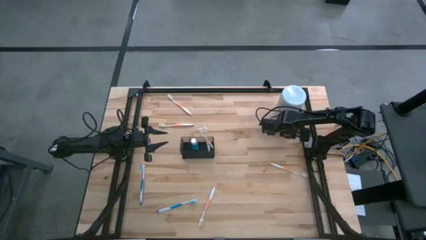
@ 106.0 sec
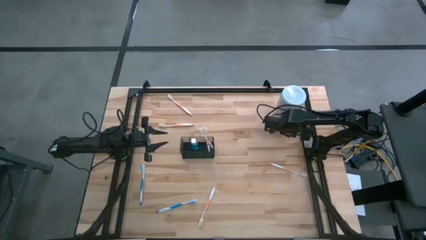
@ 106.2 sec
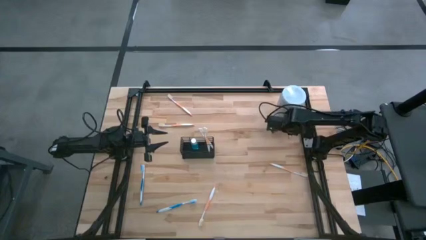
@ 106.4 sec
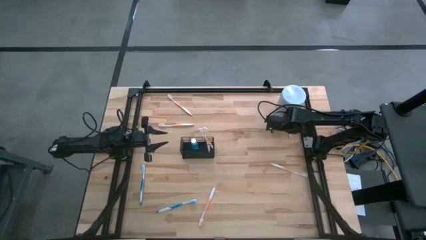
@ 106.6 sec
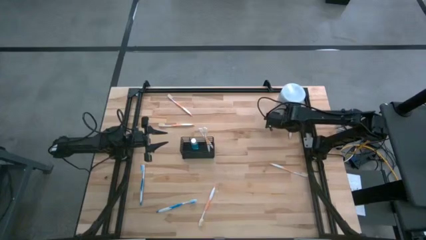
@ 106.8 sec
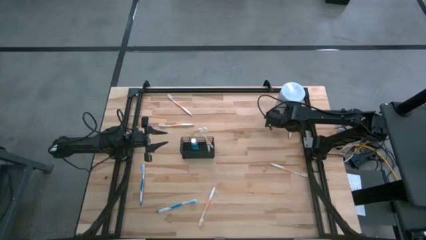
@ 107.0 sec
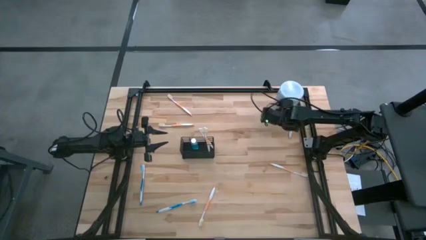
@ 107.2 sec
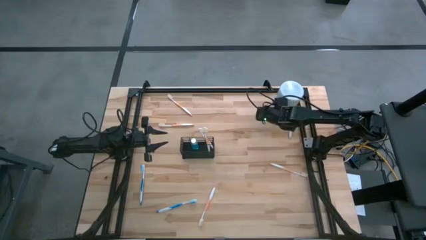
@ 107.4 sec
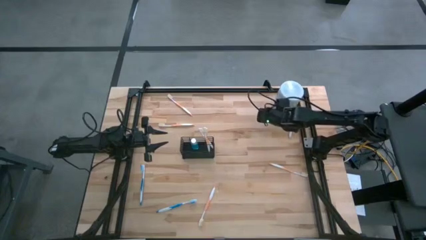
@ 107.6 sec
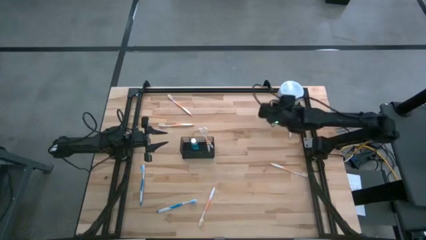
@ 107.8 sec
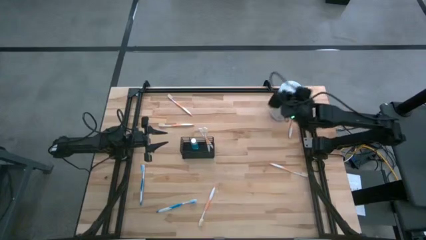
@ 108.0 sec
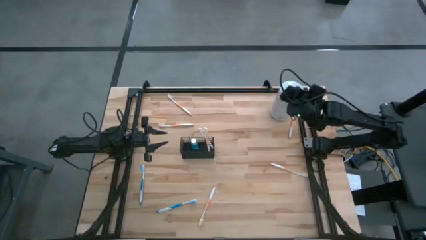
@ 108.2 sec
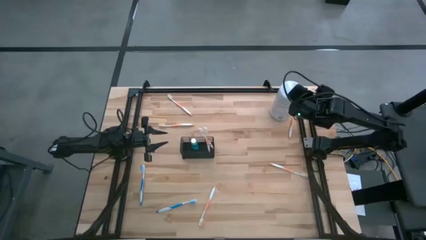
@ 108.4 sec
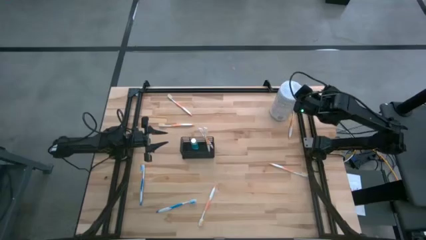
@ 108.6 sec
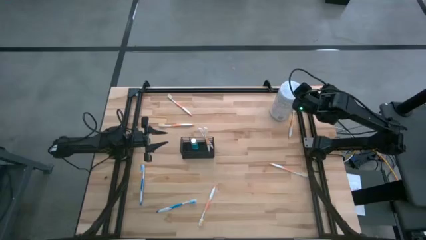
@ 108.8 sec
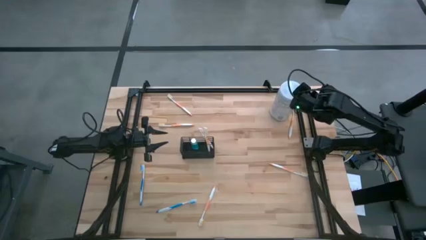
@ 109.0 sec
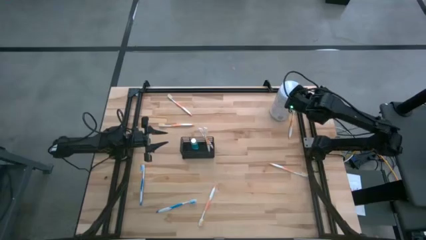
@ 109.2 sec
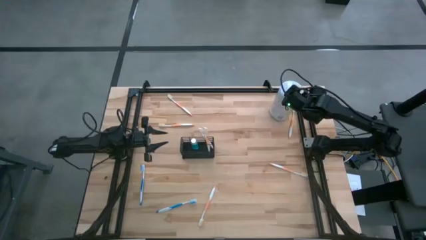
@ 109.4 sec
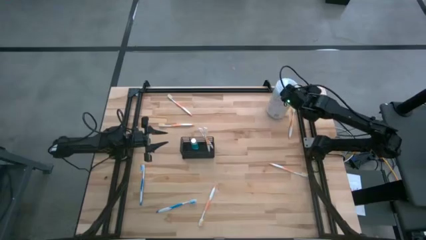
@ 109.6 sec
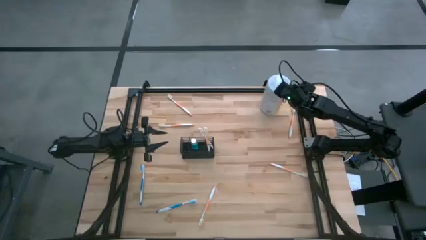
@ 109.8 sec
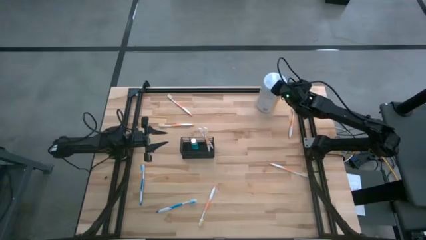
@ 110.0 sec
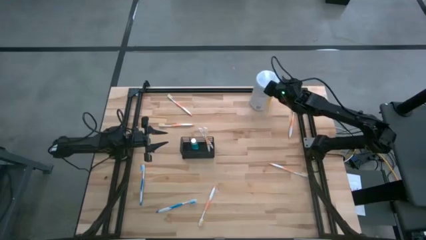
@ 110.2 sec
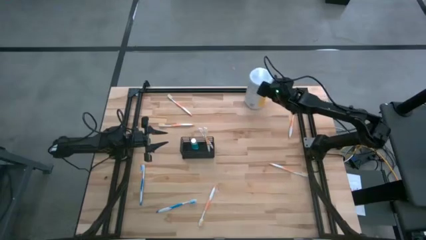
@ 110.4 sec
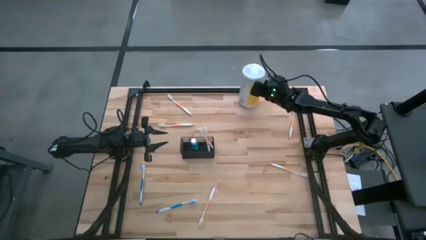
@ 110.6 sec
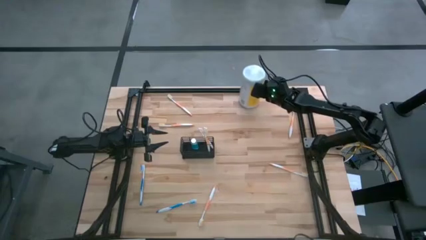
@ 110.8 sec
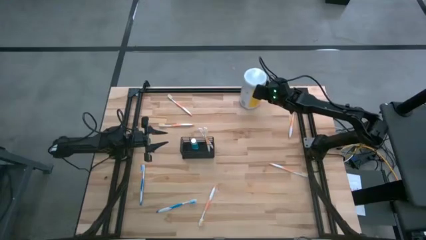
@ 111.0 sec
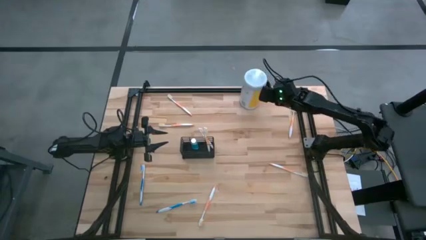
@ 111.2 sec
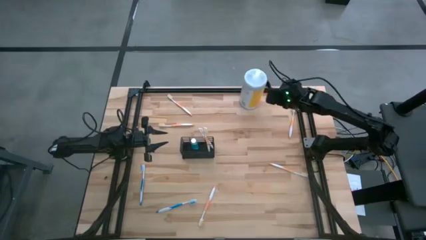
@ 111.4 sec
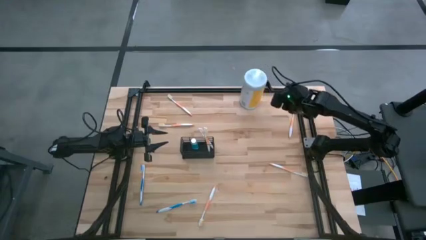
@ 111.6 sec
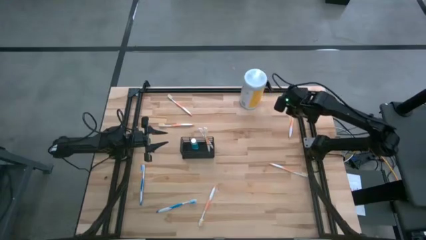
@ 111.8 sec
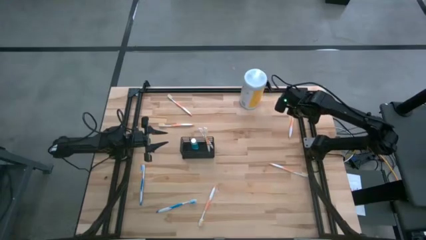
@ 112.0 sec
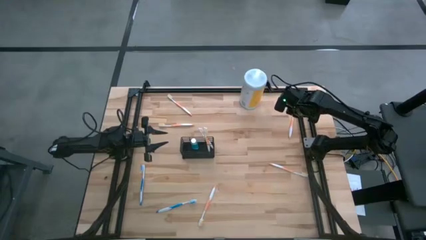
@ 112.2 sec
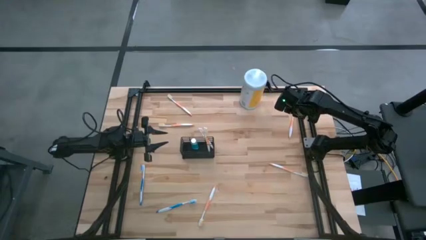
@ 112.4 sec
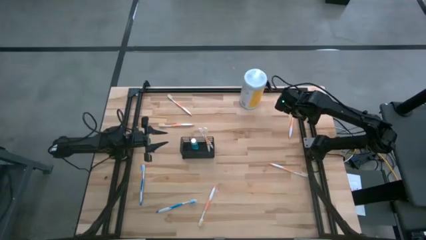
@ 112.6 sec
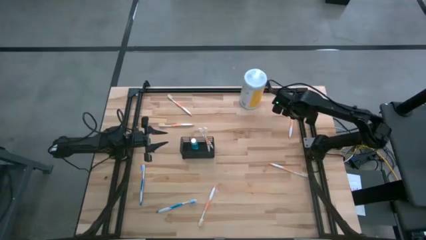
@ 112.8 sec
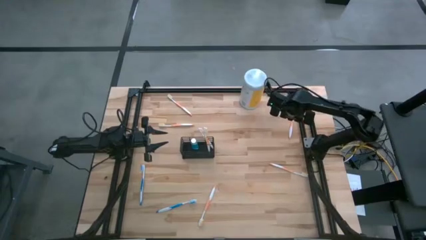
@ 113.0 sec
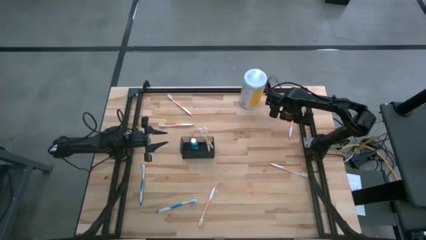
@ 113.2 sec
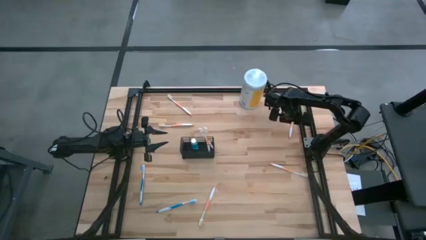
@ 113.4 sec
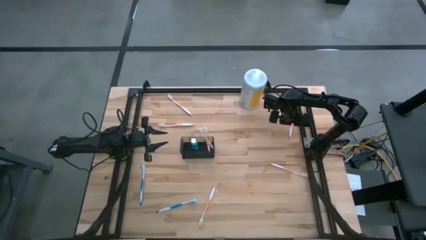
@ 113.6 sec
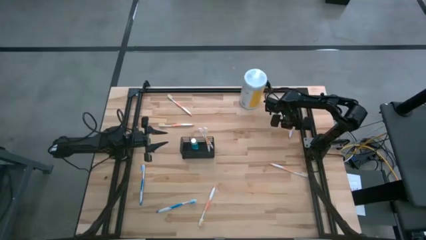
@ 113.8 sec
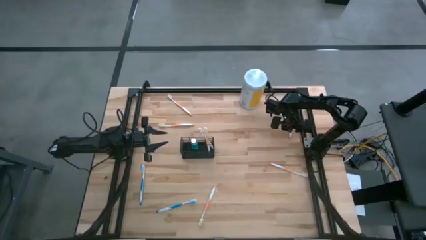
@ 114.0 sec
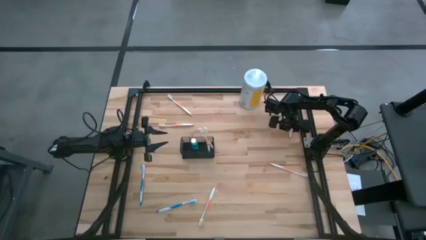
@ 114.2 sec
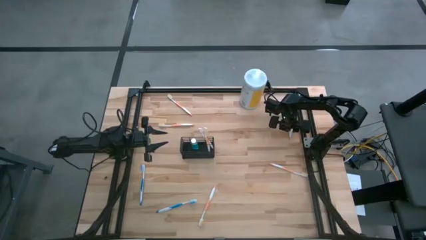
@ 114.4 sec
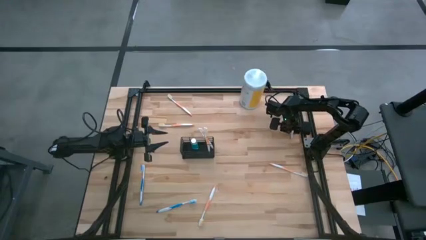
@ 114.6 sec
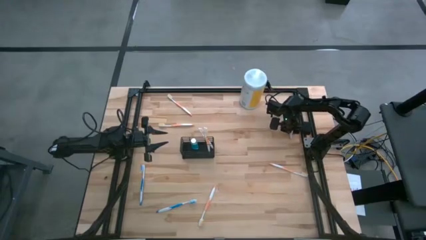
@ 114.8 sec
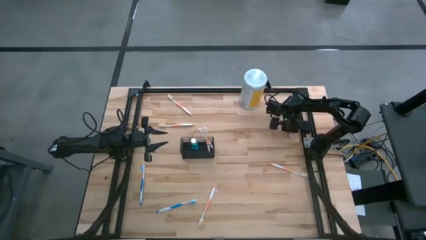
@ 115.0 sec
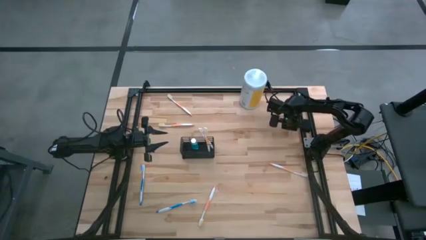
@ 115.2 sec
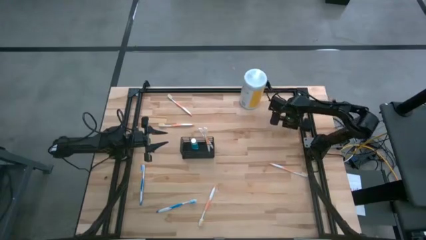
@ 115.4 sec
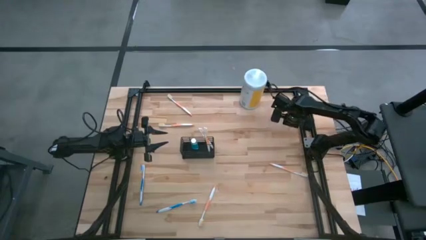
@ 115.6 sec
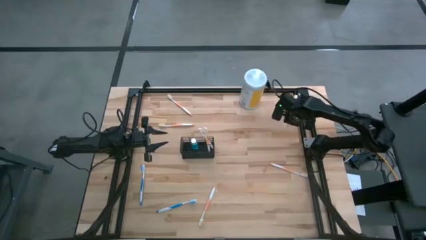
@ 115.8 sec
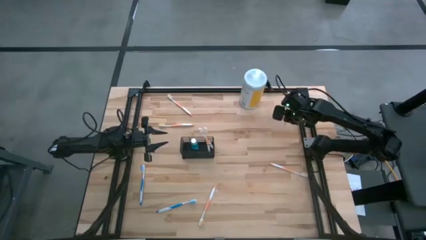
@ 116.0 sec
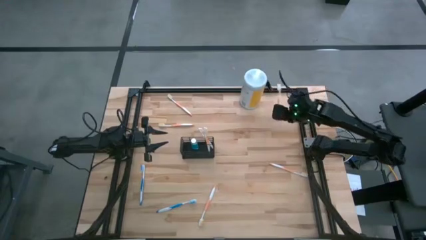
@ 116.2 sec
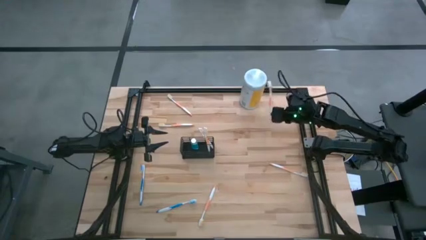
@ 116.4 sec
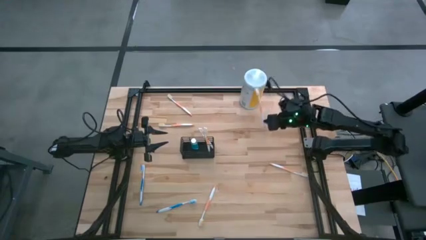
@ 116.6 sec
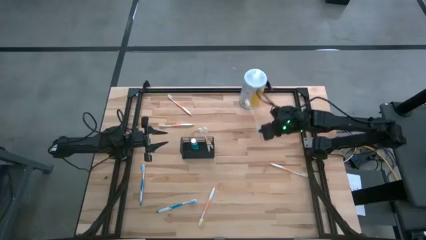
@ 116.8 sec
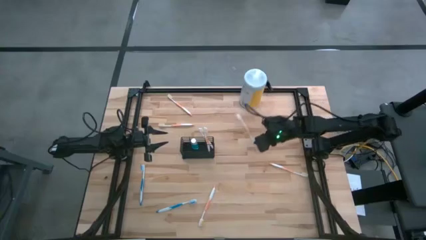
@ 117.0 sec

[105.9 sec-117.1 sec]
Task: Pick & Place toothbrushing station
Put the orange toothbrush into the right section of the wire organizer

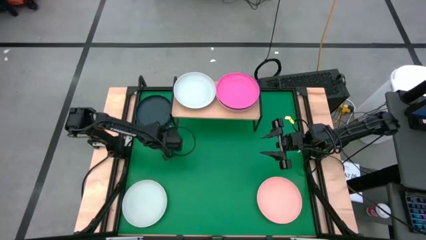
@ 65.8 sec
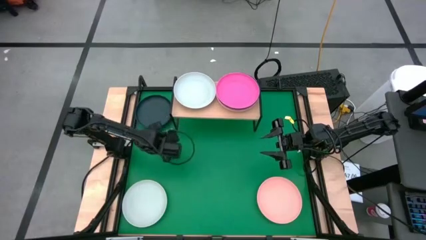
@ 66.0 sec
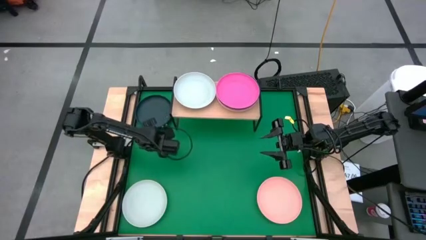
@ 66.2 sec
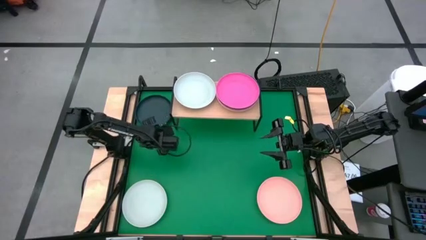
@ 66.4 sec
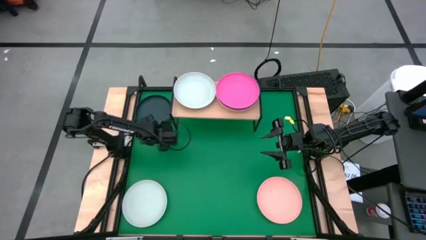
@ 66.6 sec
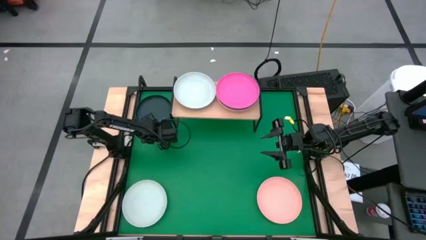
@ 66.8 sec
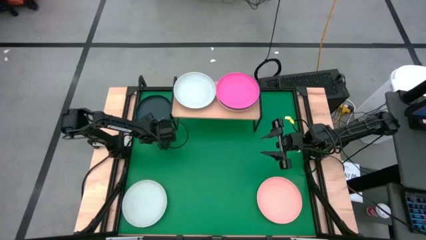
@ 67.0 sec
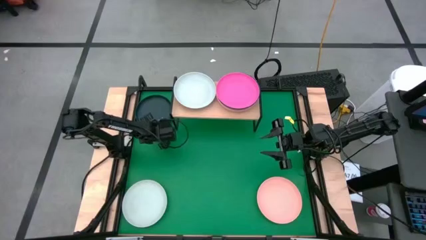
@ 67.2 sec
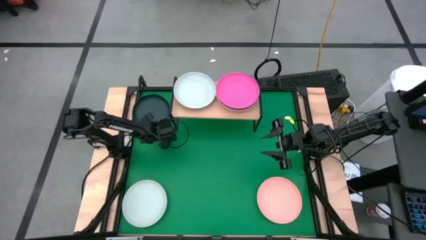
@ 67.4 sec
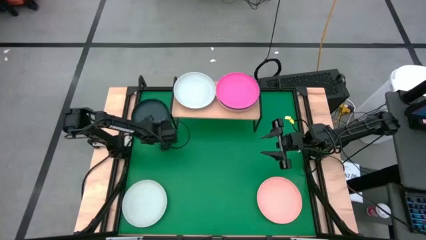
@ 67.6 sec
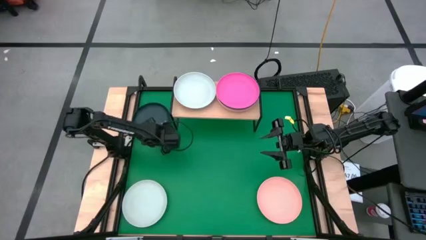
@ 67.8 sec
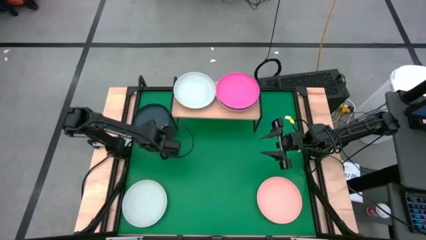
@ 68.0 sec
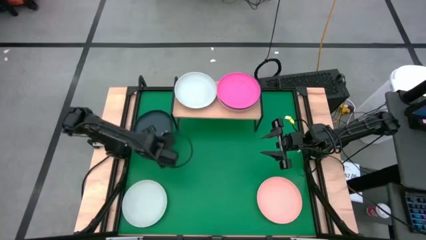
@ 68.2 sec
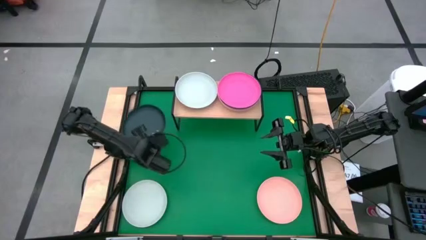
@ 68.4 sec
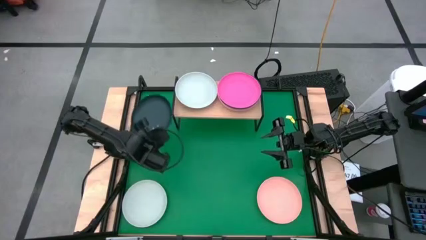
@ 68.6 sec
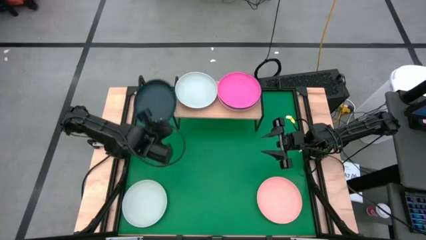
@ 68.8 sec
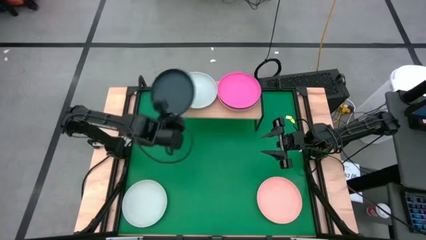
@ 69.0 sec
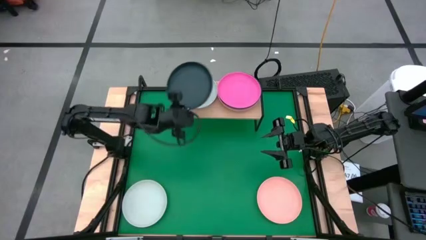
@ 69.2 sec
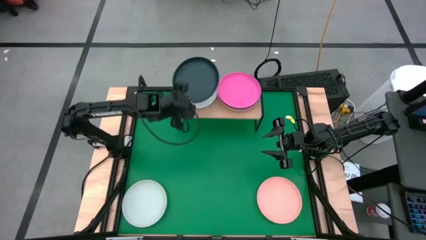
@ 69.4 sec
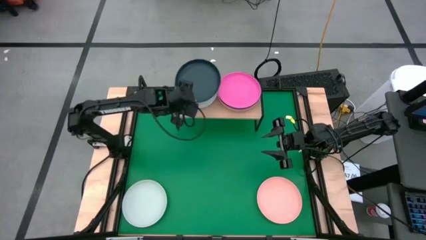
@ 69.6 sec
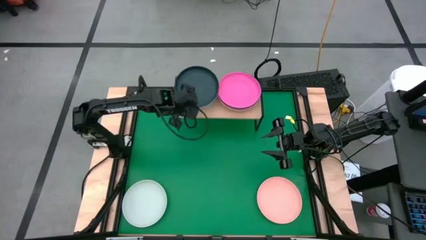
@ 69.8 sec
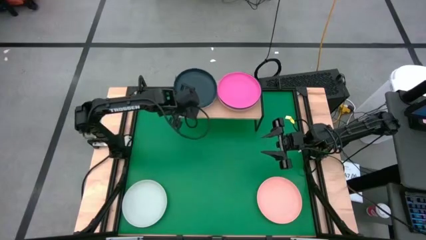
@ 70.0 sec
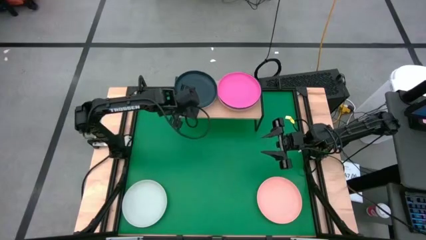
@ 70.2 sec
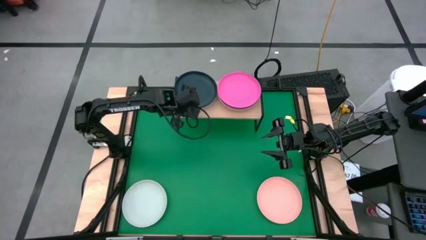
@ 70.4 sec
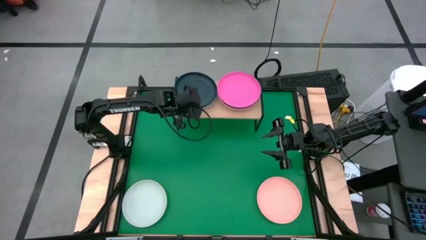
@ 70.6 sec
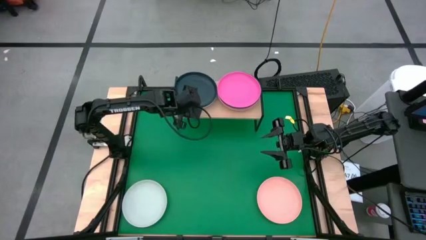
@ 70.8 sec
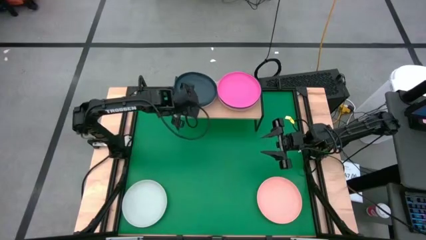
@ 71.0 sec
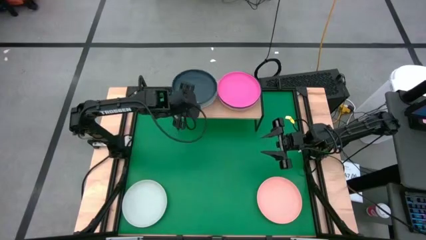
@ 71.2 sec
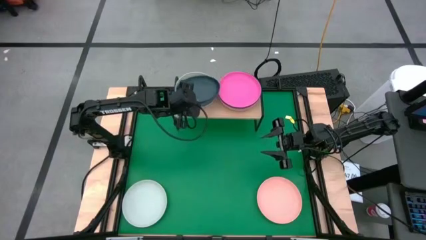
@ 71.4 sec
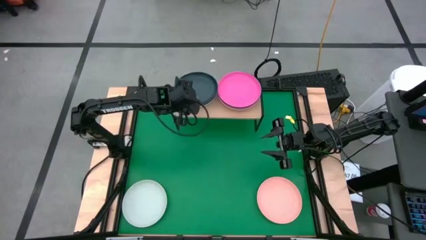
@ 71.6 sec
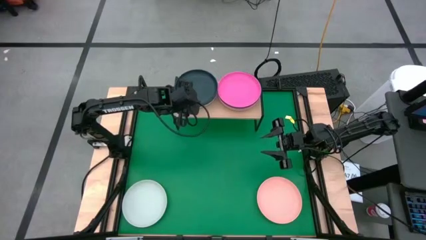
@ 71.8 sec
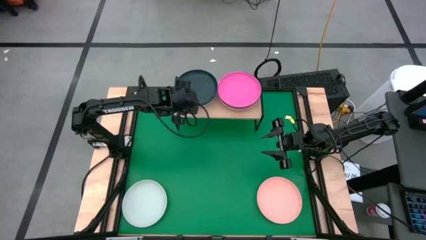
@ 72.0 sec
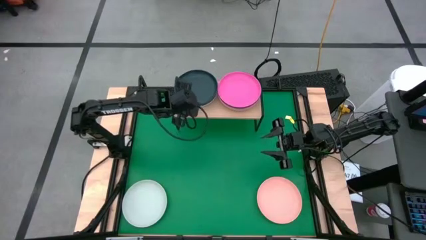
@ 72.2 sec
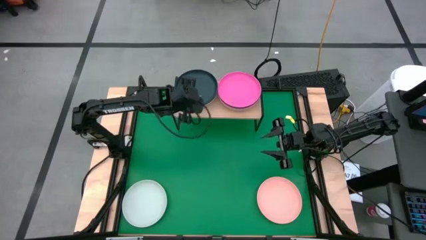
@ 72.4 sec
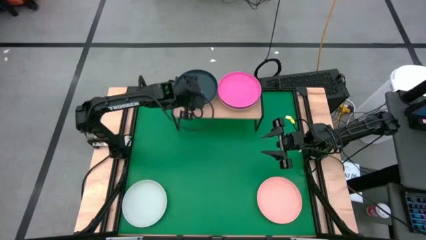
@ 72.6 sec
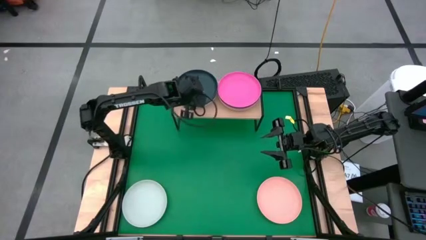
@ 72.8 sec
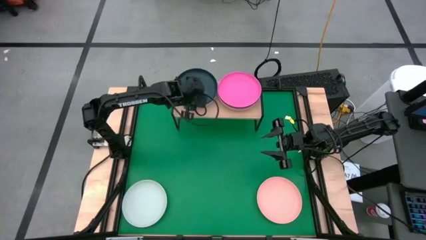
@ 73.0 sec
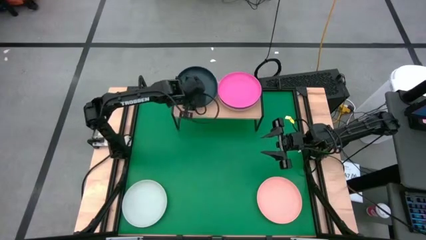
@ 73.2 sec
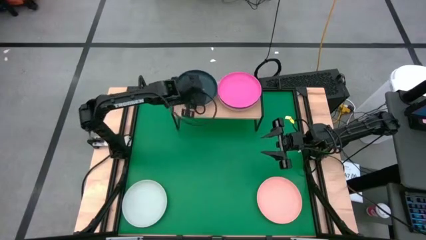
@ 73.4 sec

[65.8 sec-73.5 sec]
Task: Place and stack plates onto a shelf
Stack the dark blue plate on top of the white plate on the shelf
